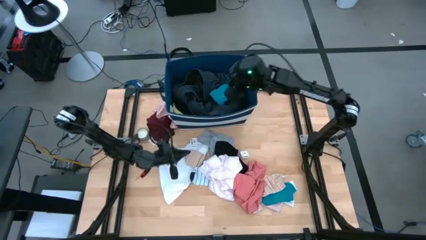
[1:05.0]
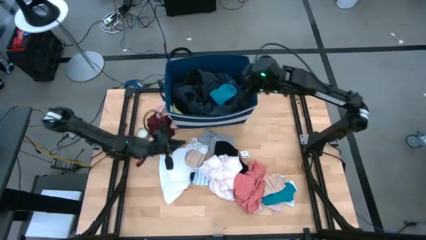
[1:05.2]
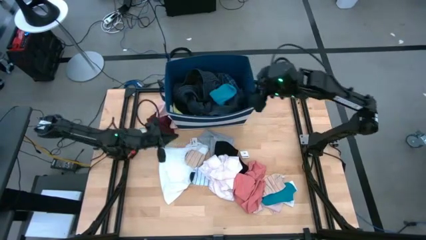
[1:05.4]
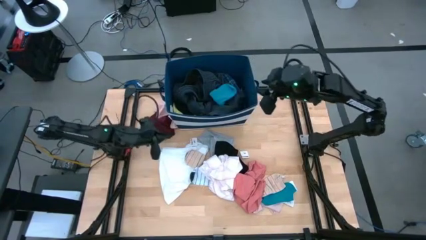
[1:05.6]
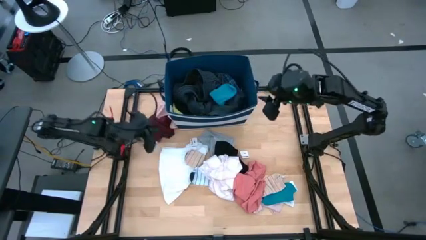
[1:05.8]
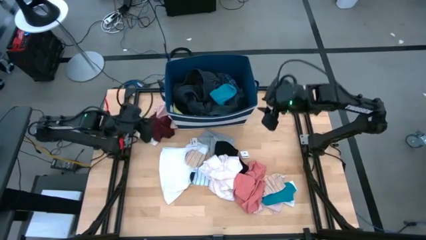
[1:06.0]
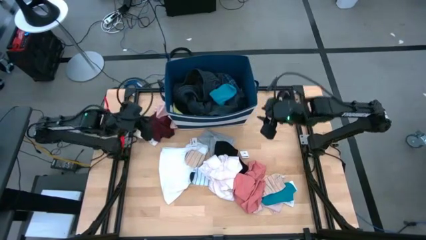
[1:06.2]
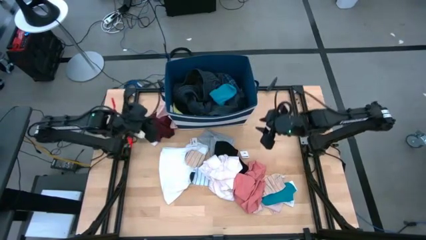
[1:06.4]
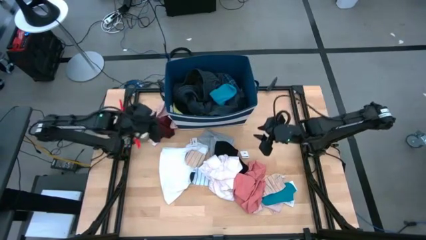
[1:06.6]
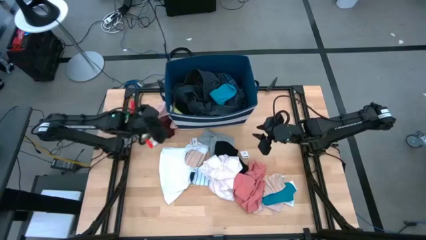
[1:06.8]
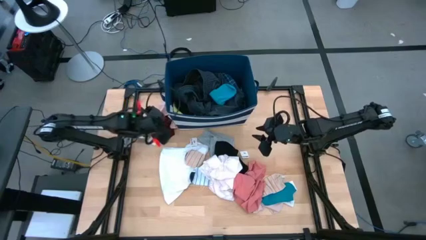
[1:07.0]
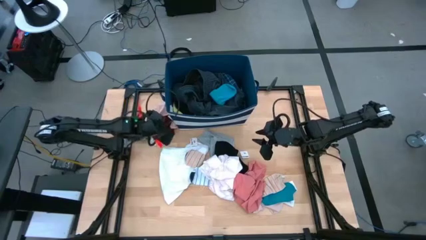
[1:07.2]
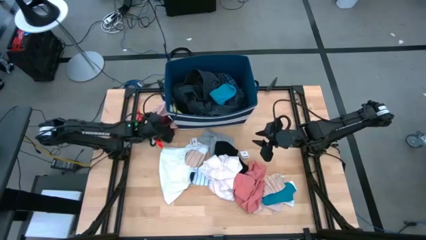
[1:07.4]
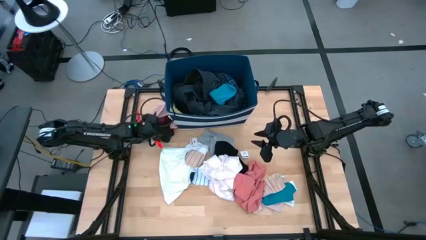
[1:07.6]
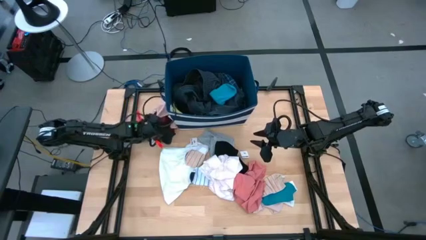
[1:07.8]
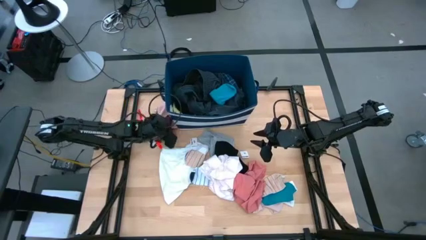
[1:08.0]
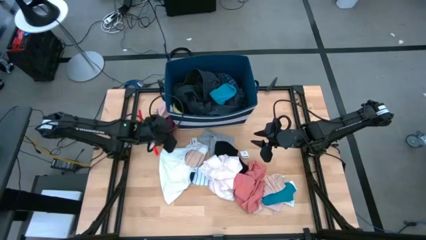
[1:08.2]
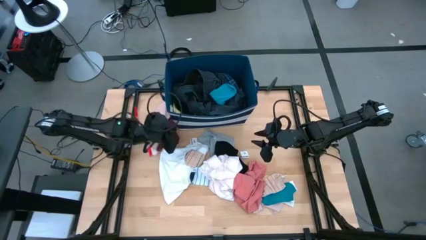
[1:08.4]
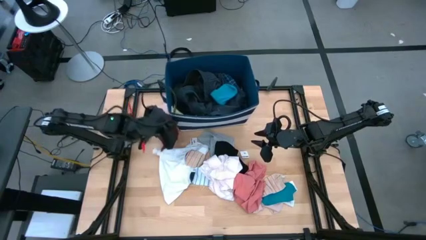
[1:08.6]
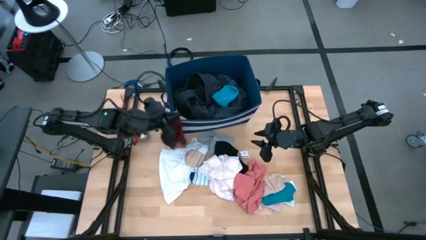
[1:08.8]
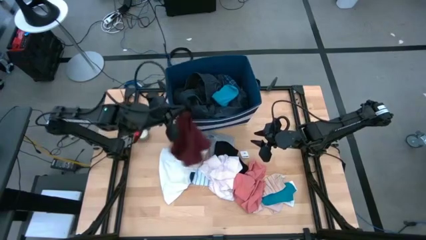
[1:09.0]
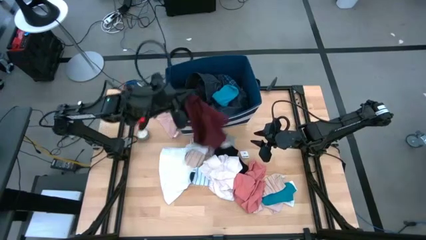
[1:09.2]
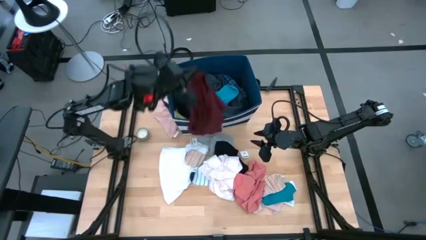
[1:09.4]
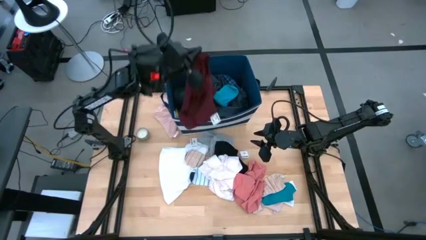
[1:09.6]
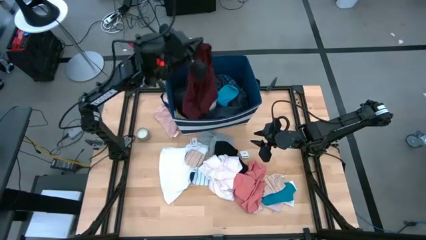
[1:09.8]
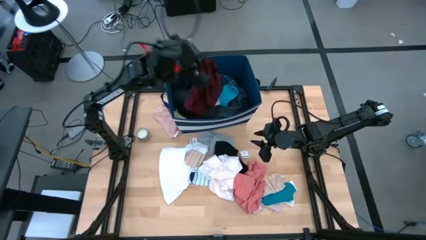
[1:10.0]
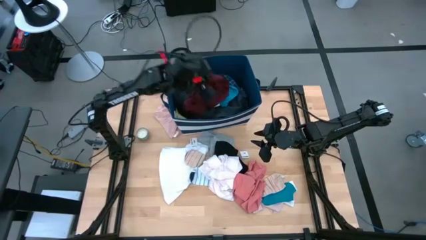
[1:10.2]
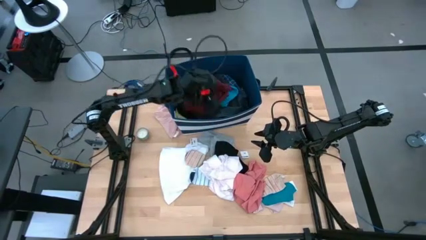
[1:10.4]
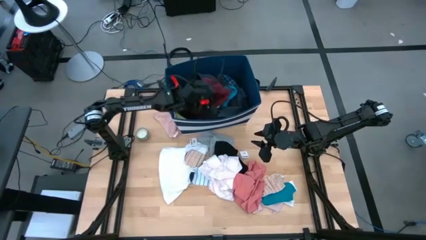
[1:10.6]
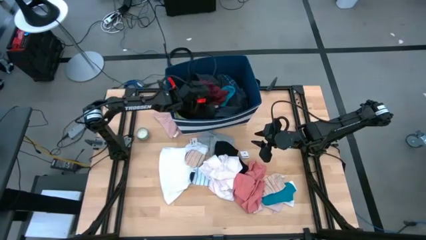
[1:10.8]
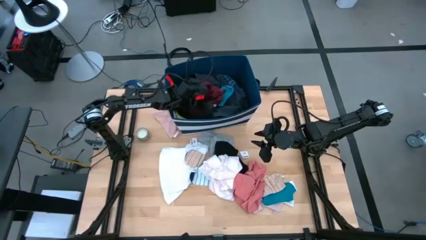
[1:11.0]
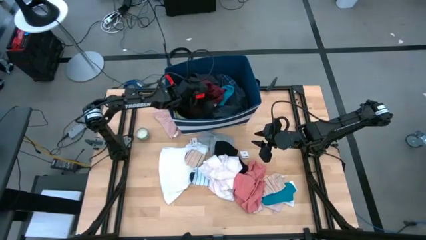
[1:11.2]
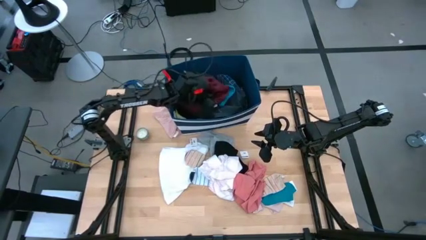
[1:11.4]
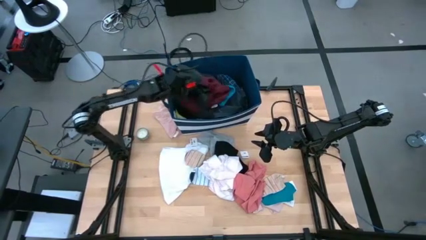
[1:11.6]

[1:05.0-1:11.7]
Task: Sort clothes
Put the red underwear into the blue laundry bin

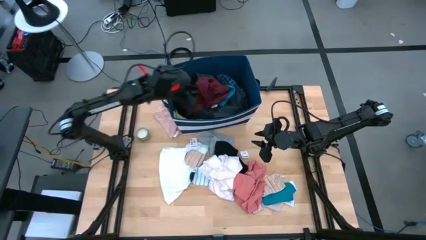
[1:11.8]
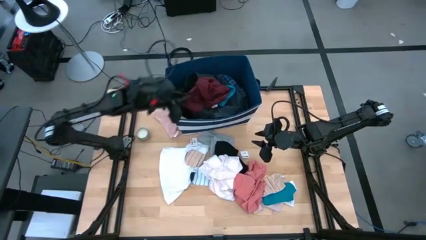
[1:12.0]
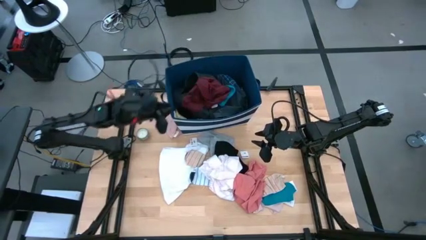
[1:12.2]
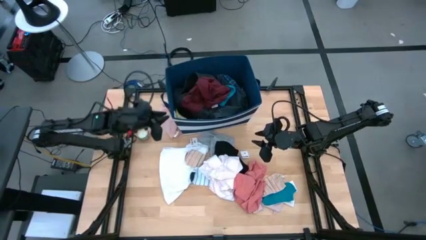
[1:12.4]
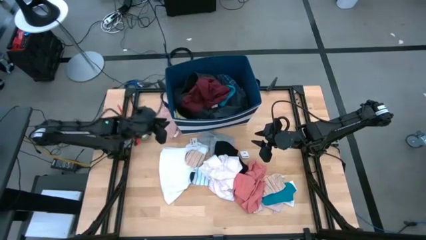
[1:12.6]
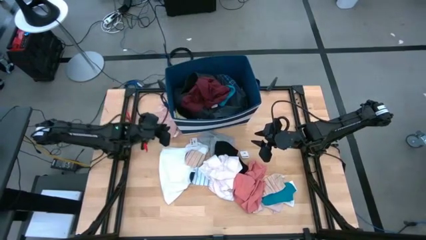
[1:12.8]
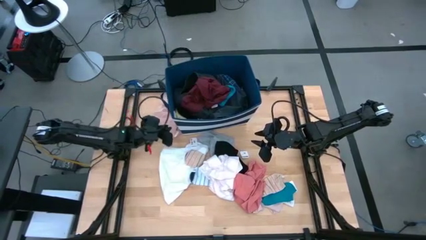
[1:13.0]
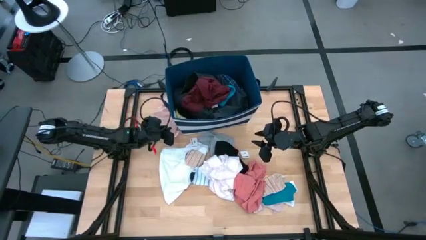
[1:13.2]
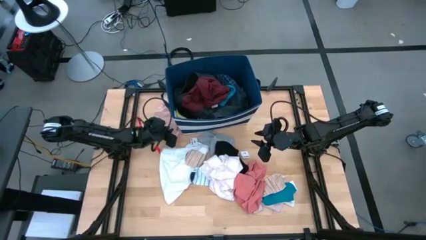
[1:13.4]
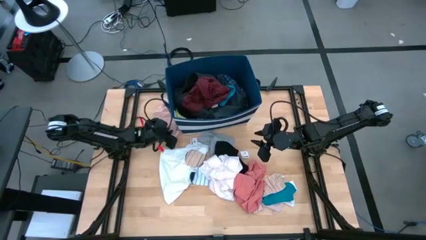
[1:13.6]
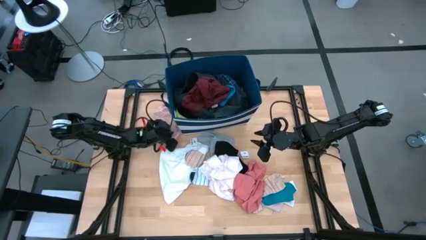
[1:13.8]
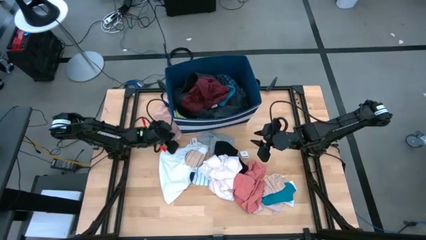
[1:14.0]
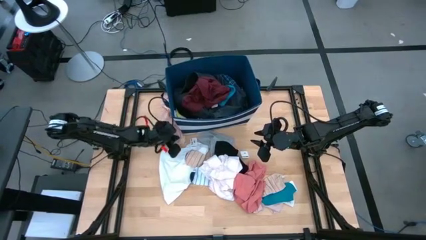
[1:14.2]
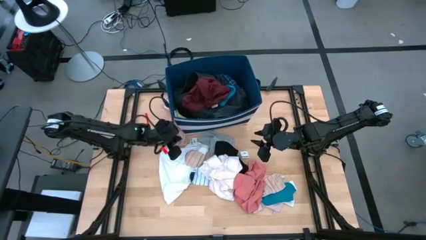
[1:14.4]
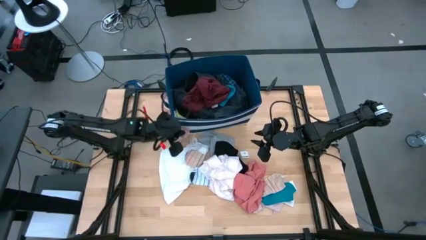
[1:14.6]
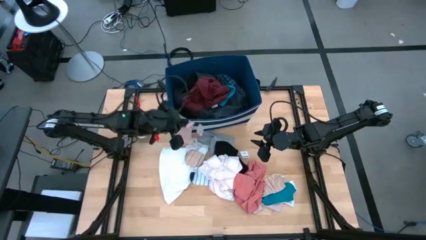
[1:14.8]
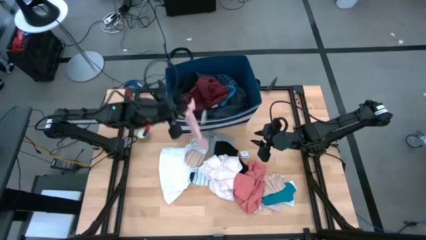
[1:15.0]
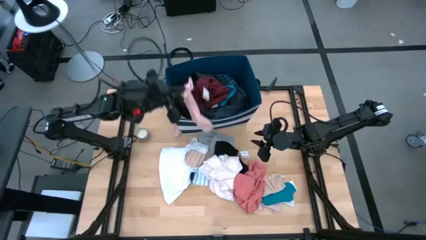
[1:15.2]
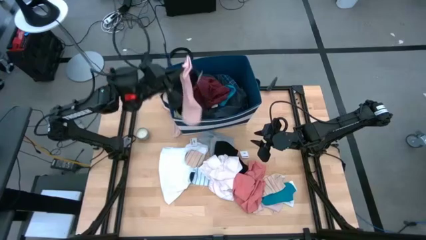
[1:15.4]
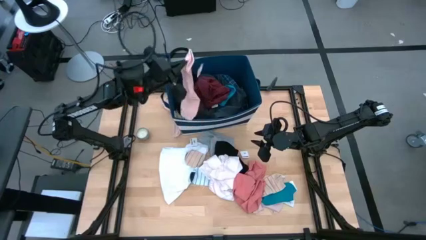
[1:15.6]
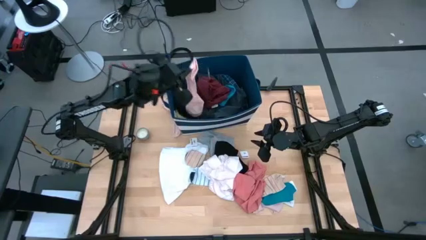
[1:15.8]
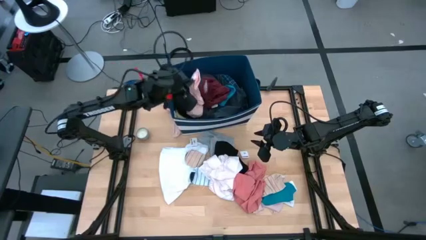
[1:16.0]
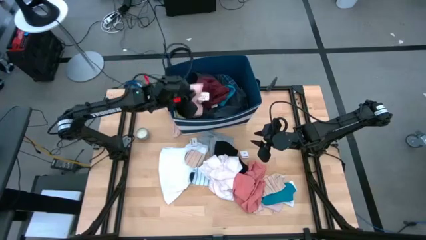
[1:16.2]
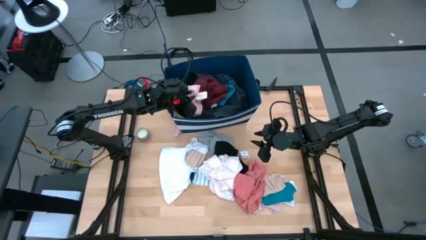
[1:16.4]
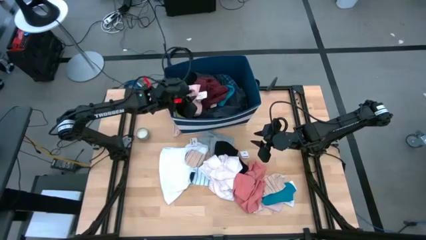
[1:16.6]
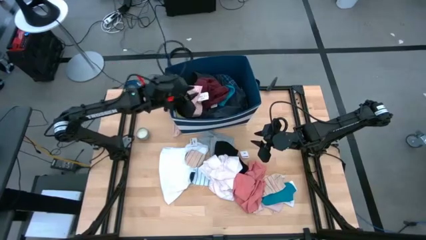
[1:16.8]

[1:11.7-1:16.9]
Put the left pink sock into the blue laundry bin

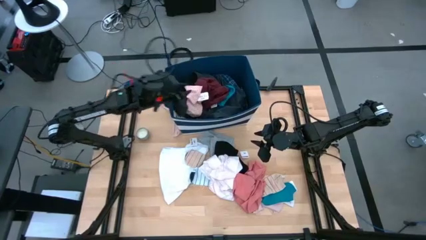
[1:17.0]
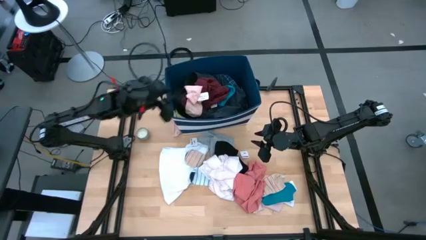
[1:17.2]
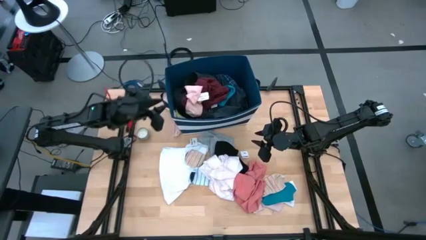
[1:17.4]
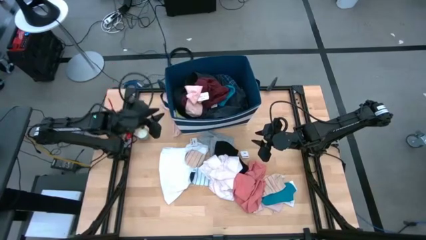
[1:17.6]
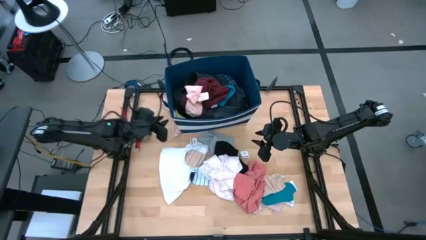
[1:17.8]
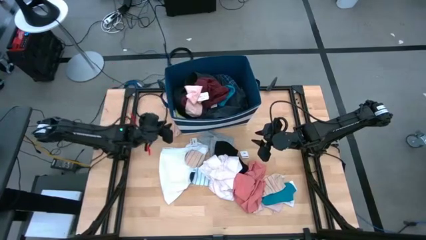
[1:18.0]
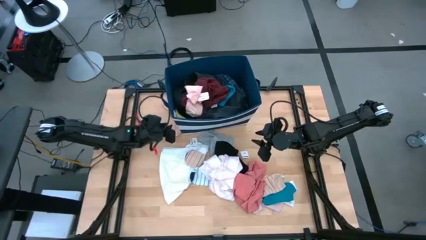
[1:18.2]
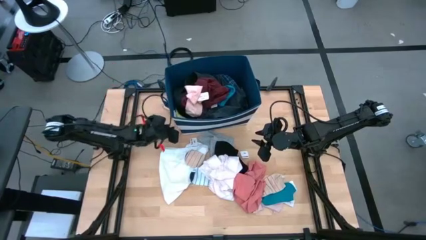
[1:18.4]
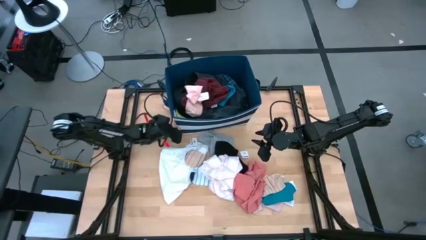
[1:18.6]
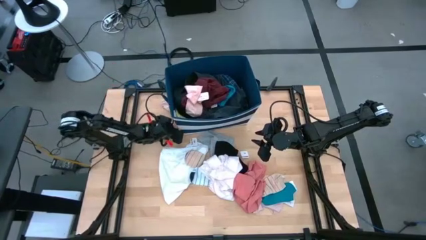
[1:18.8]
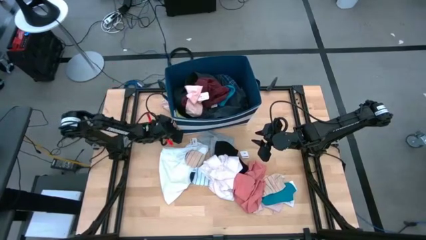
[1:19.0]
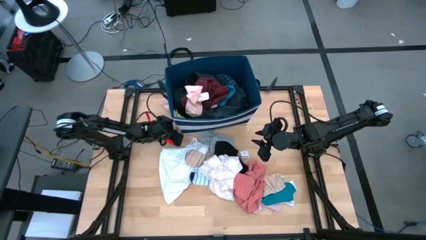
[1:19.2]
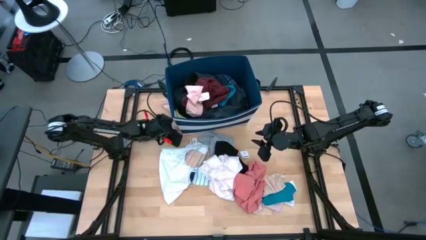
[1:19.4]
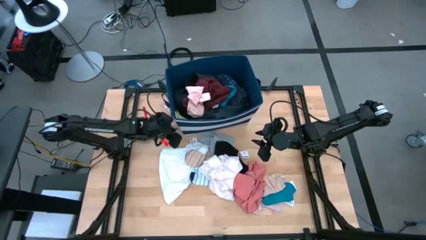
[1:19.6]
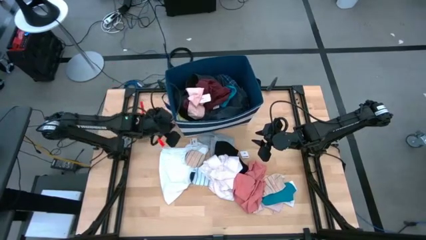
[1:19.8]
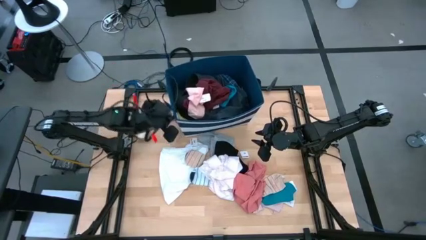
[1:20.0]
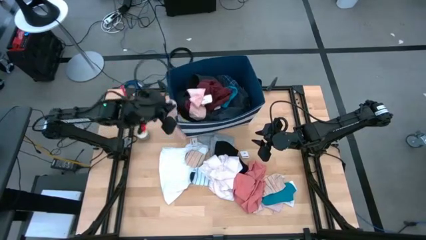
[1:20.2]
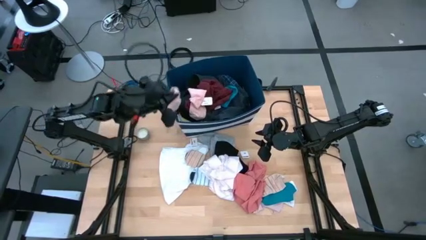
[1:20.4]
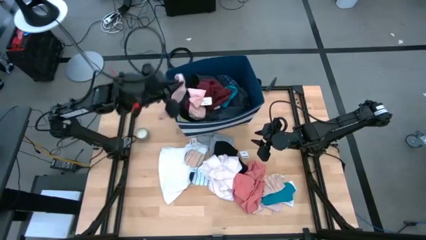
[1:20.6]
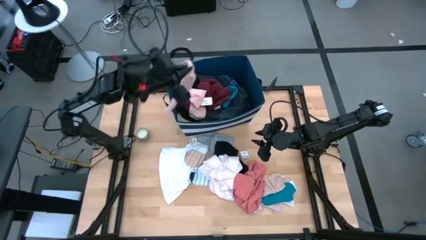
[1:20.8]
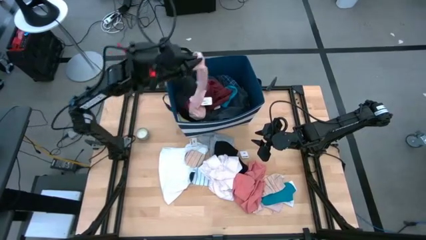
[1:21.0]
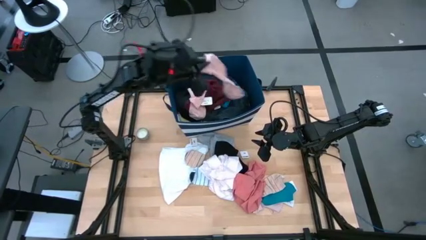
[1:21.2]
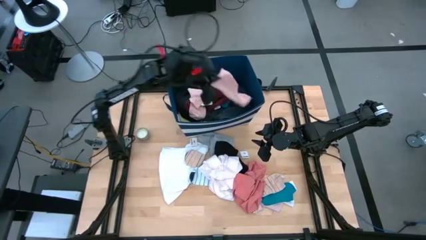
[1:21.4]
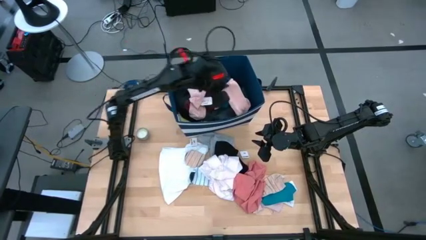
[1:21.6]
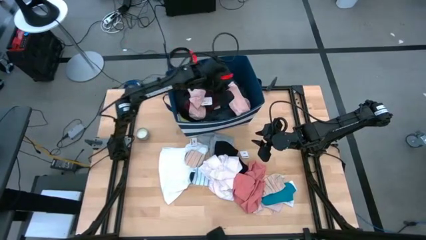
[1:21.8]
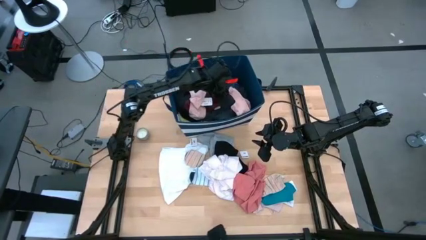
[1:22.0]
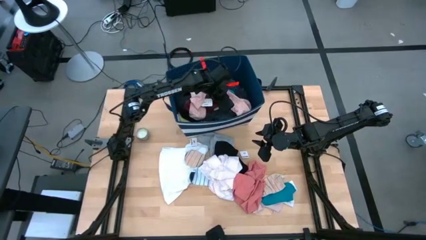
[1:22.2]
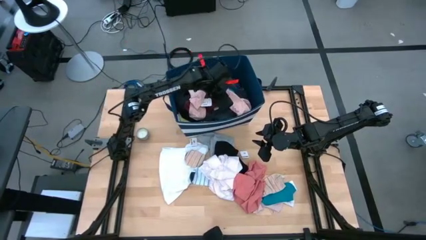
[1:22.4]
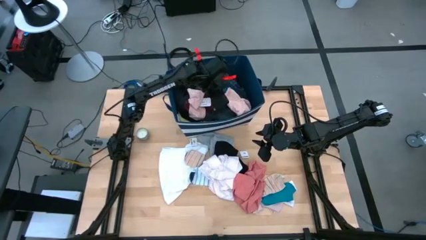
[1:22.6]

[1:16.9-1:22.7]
Put the pink sock into the blue laundry bin
